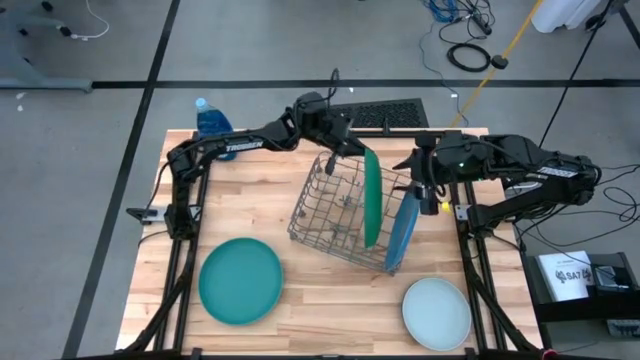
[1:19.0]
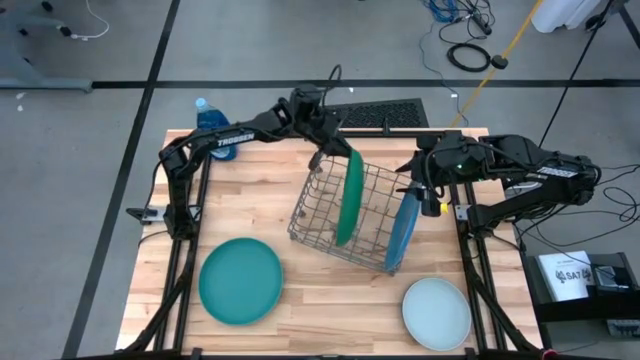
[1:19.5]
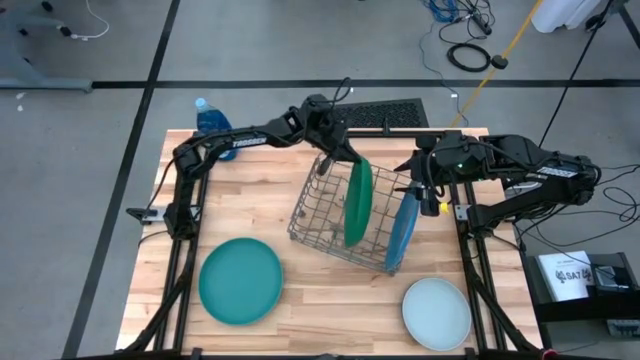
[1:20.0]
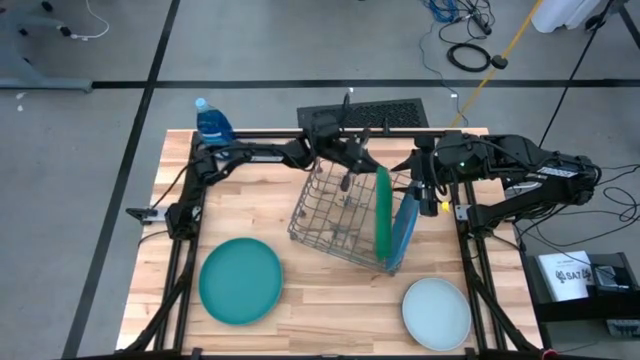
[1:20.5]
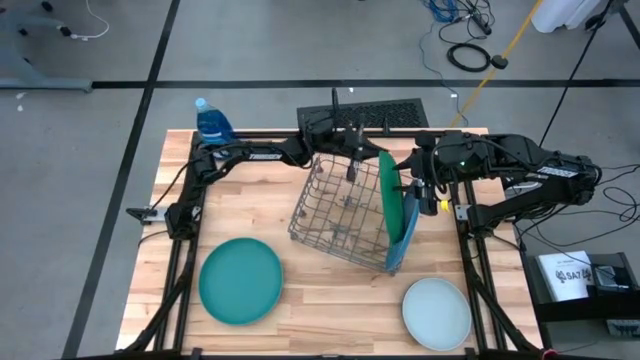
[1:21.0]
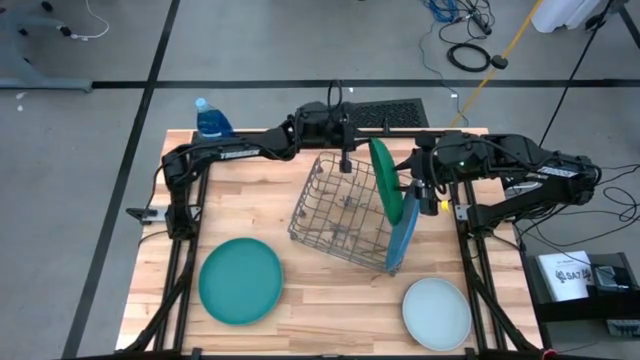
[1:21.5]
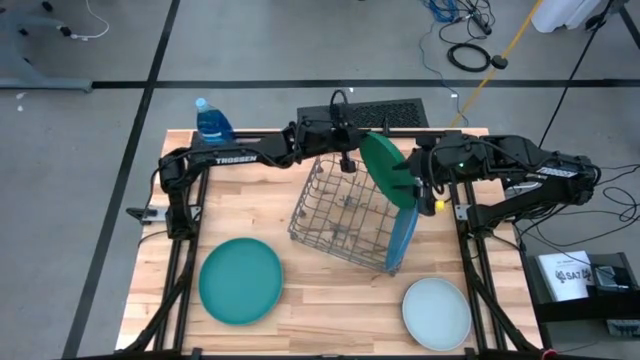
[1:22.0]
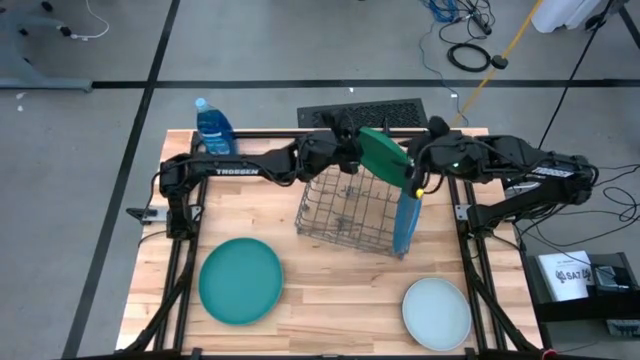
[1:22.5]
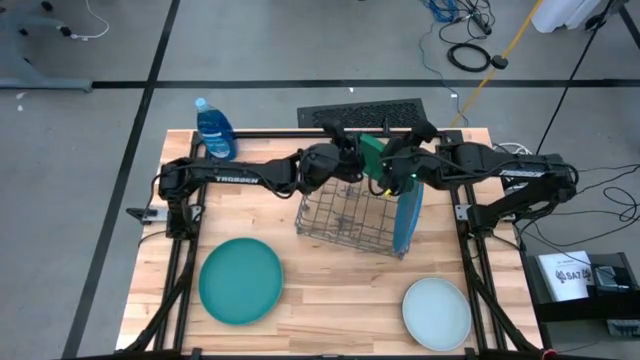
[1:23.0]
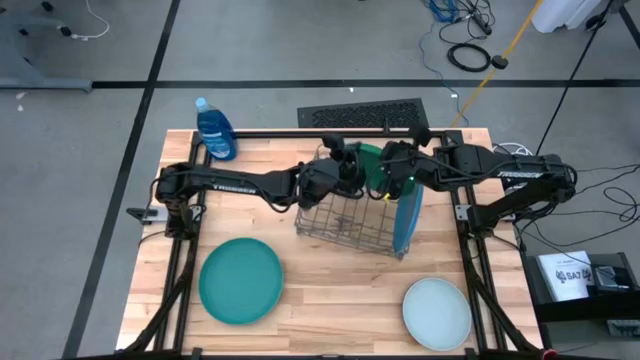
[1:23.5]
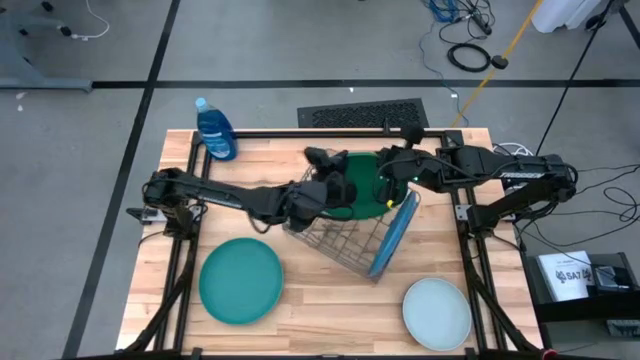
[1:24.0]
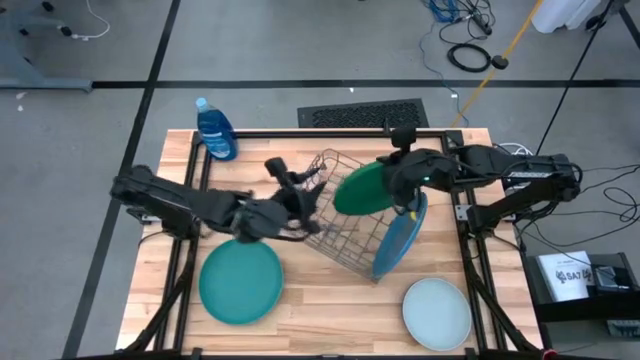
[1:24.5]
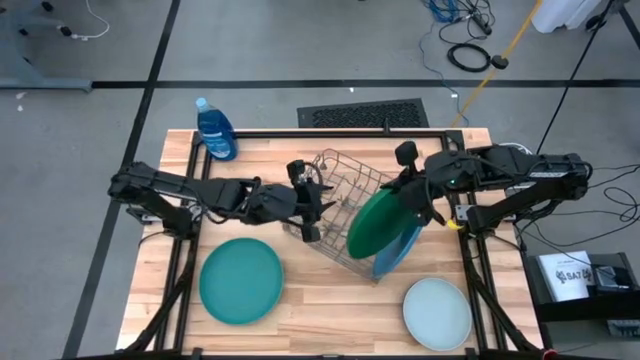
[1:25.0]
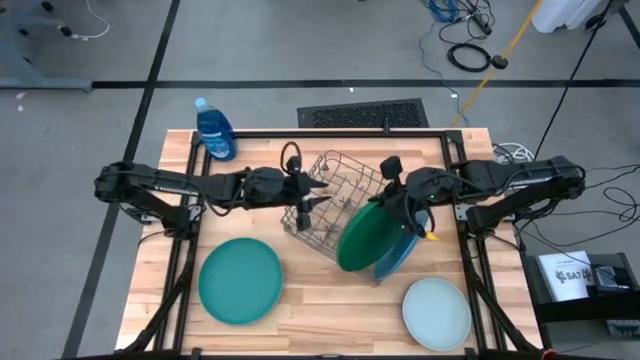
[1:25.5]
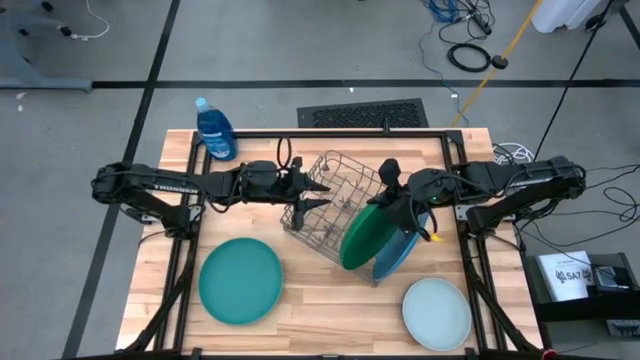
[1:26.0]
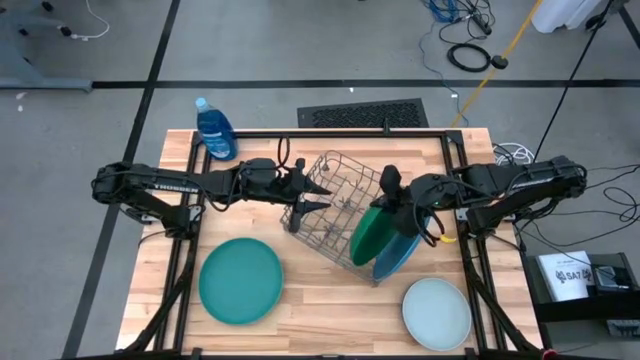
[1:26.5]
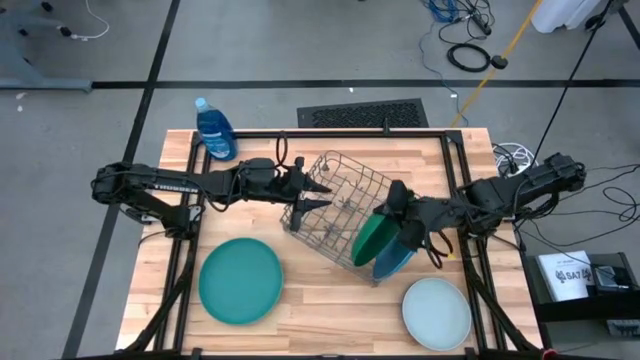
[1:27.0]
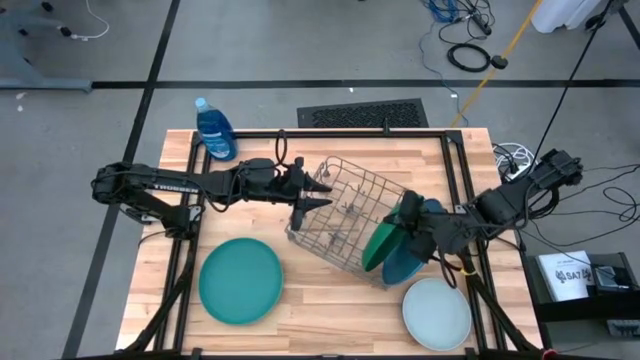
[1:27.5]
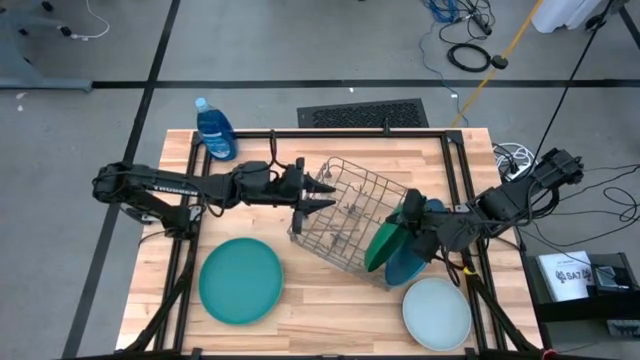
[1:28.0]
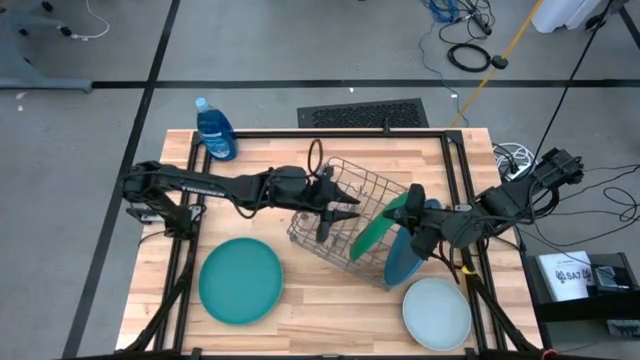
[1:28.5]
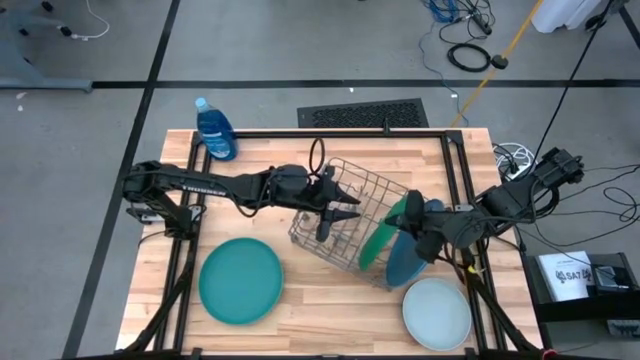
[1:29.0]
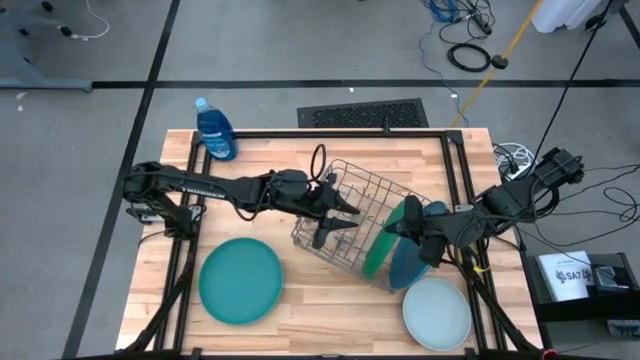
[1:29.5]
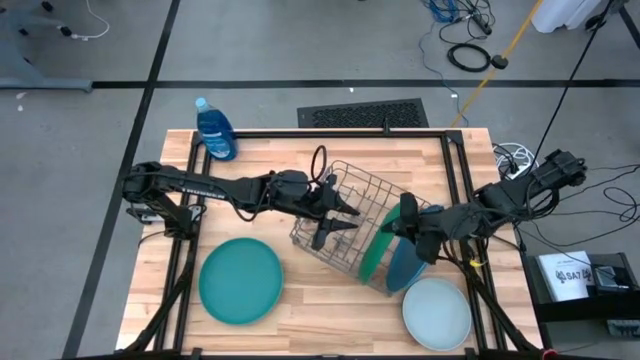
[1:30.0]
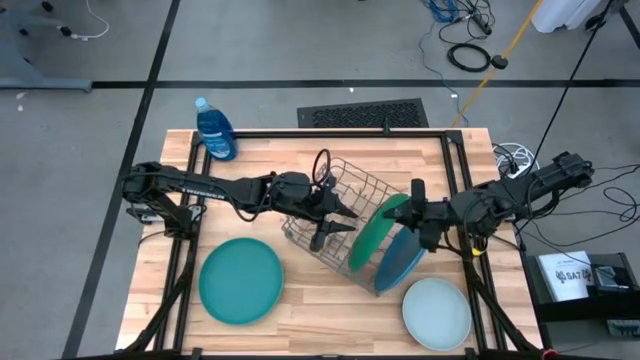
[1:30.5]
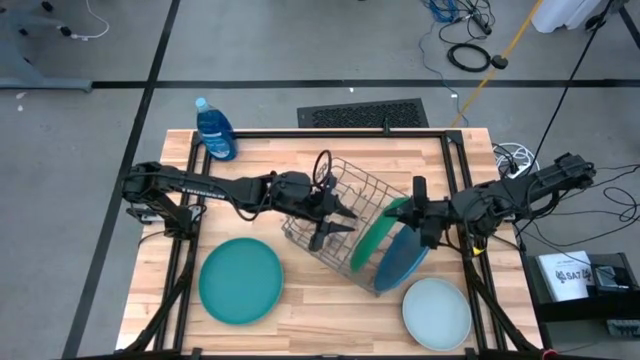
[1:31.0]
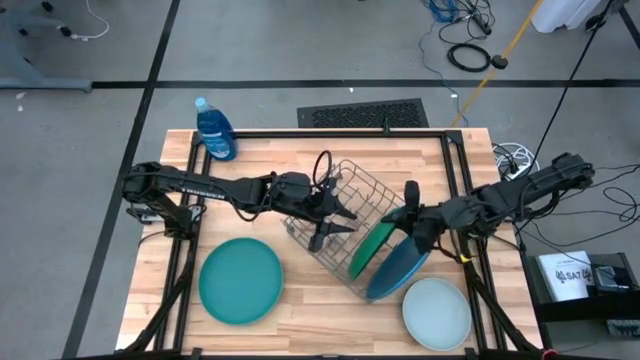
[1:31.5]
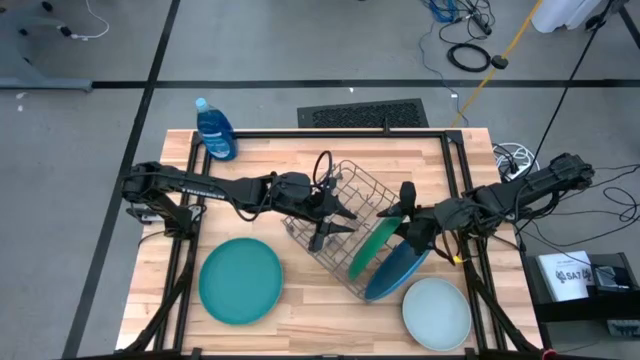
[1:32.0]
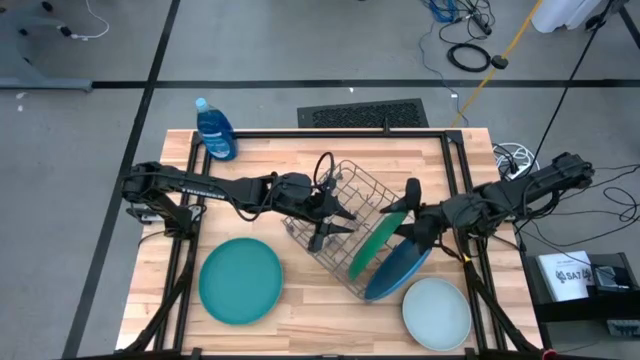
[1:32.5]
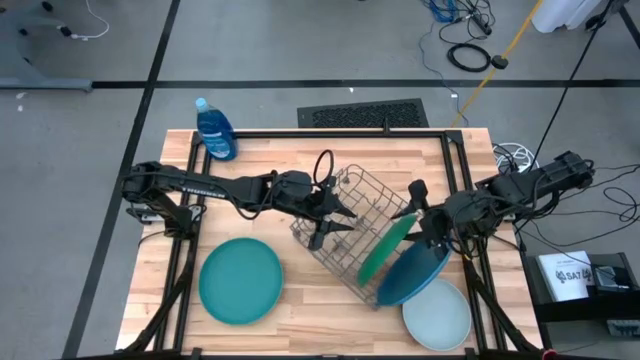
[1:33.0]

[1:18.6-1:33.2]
Task: Sort dishes
Put the dark green plate into the dish rack
